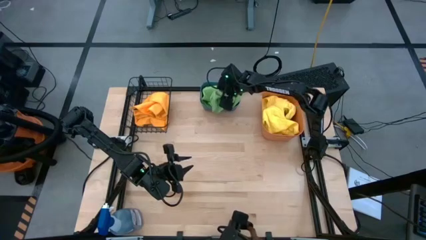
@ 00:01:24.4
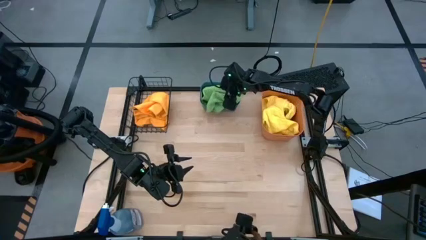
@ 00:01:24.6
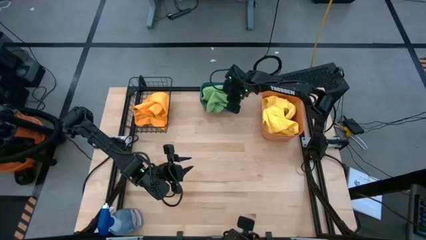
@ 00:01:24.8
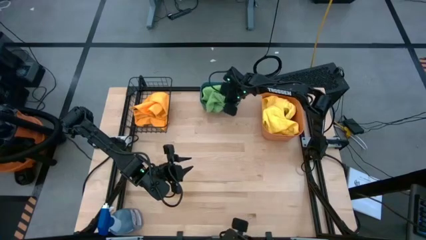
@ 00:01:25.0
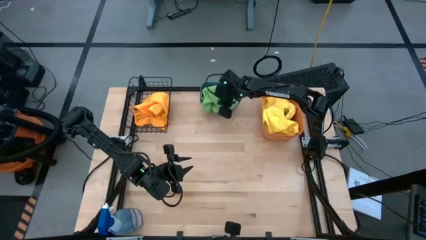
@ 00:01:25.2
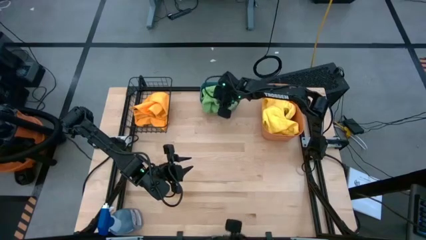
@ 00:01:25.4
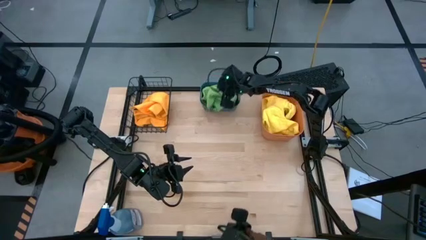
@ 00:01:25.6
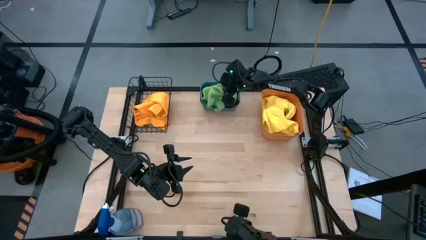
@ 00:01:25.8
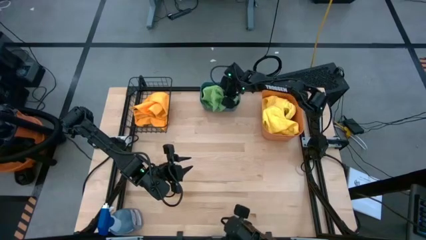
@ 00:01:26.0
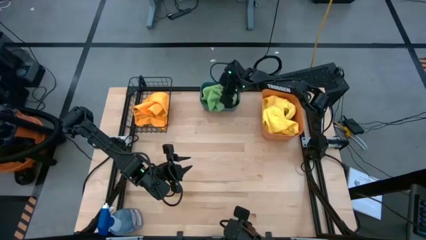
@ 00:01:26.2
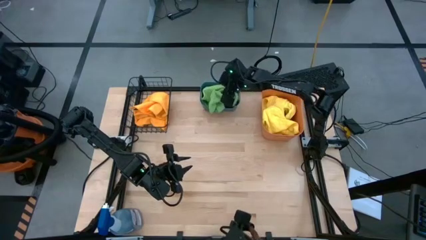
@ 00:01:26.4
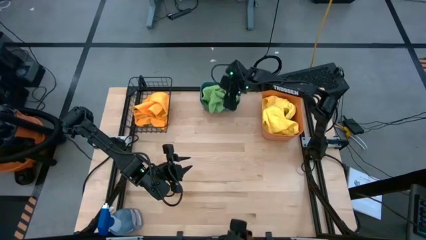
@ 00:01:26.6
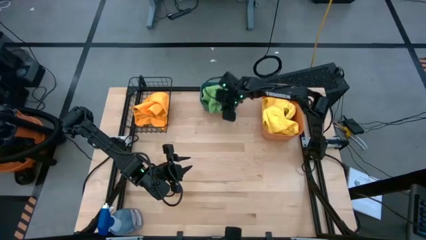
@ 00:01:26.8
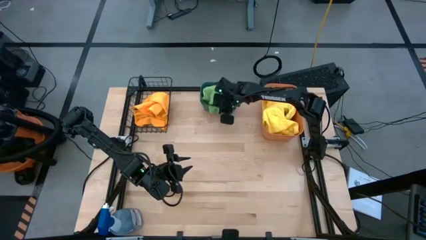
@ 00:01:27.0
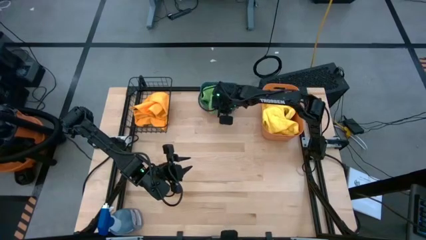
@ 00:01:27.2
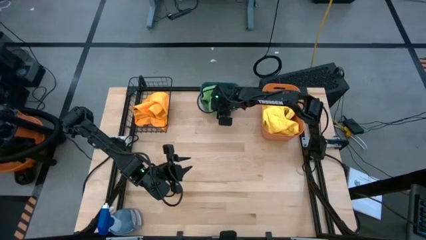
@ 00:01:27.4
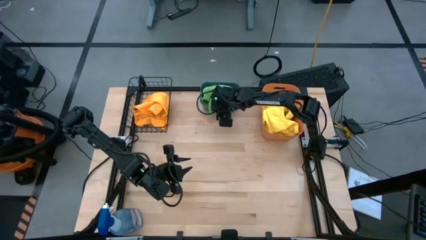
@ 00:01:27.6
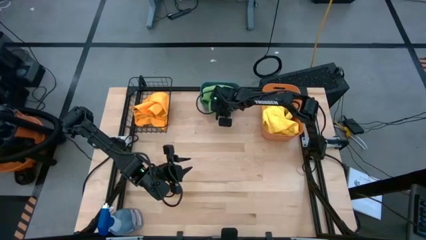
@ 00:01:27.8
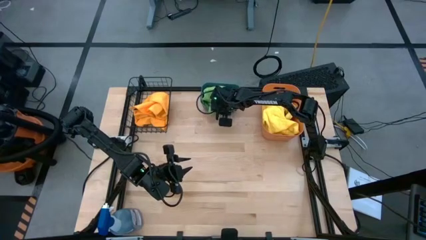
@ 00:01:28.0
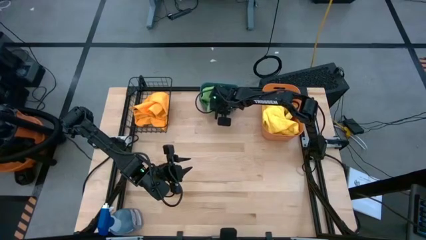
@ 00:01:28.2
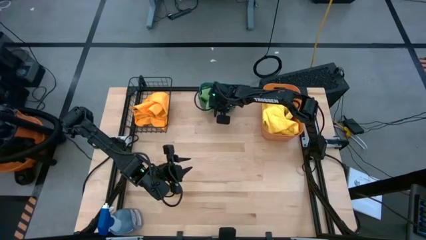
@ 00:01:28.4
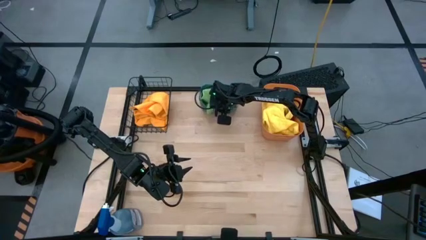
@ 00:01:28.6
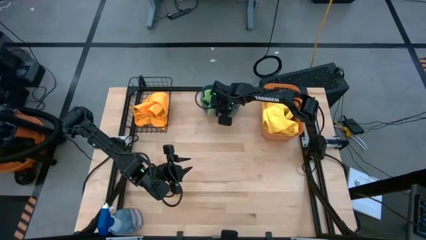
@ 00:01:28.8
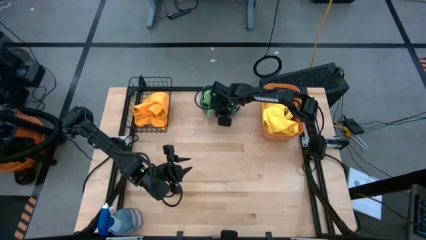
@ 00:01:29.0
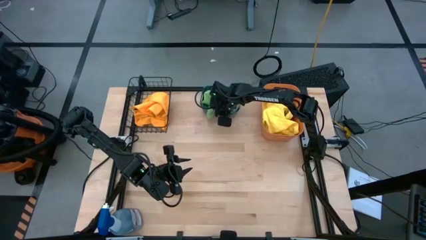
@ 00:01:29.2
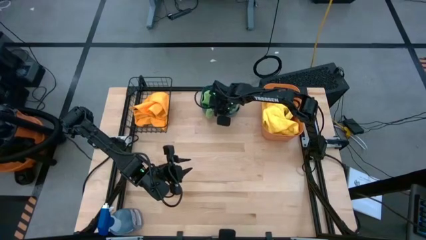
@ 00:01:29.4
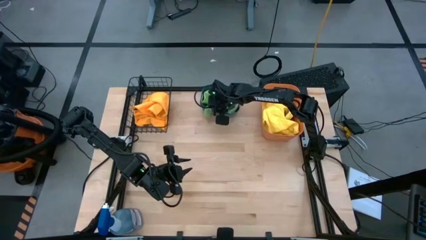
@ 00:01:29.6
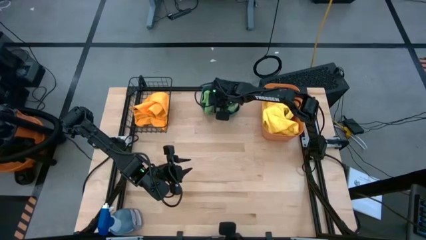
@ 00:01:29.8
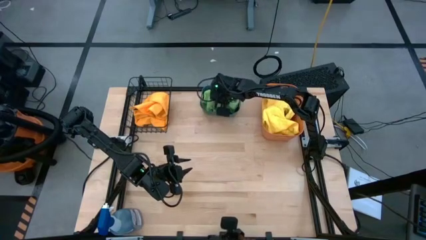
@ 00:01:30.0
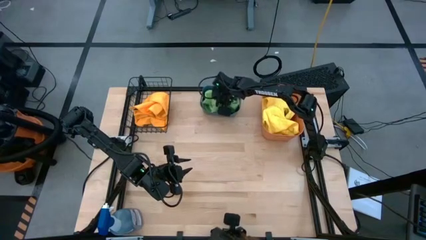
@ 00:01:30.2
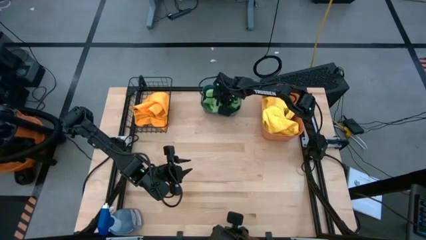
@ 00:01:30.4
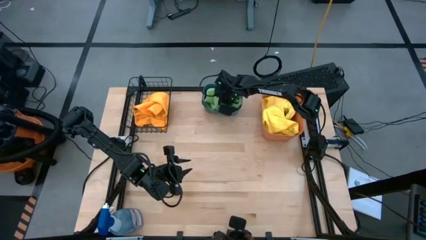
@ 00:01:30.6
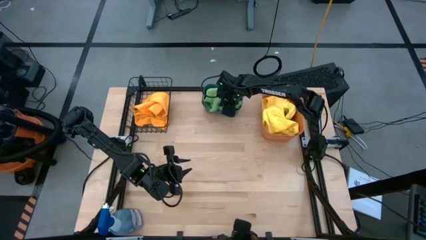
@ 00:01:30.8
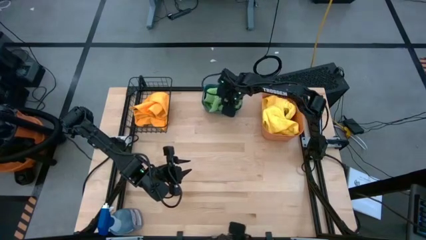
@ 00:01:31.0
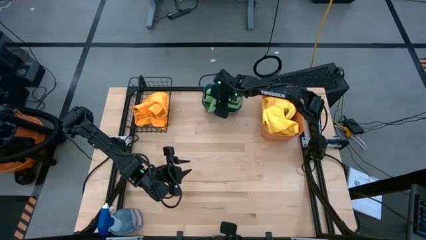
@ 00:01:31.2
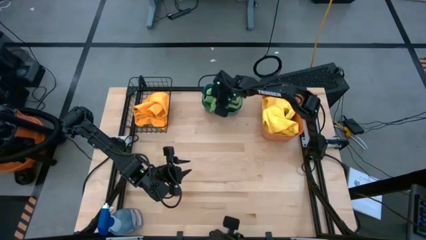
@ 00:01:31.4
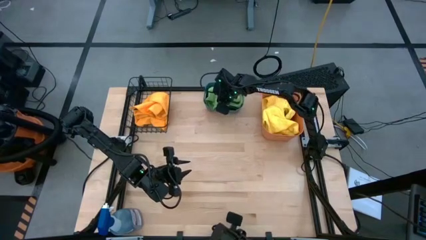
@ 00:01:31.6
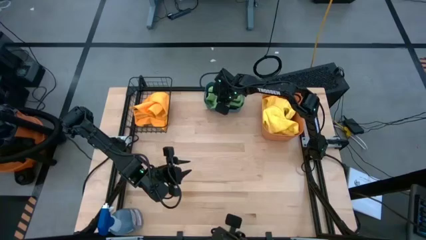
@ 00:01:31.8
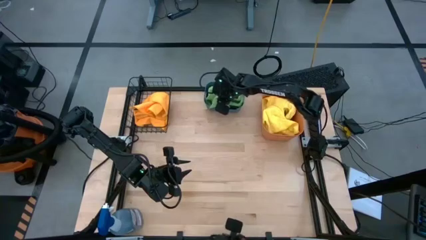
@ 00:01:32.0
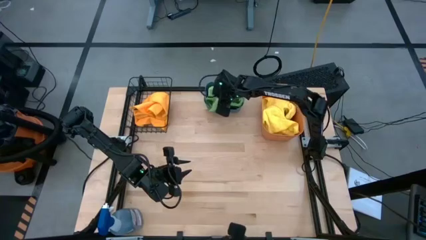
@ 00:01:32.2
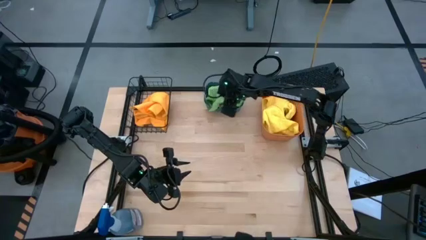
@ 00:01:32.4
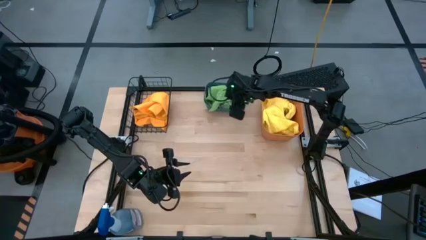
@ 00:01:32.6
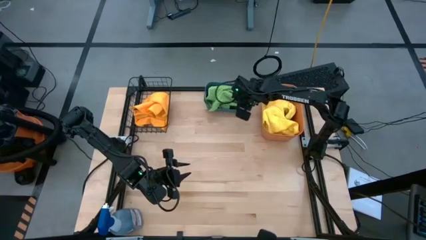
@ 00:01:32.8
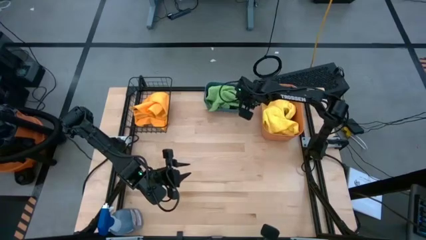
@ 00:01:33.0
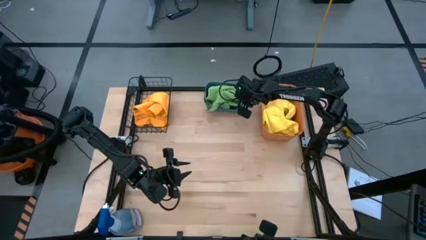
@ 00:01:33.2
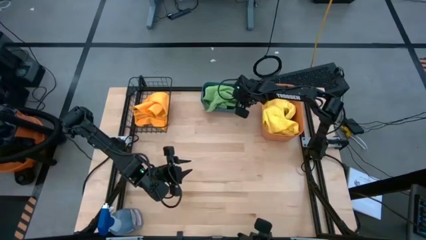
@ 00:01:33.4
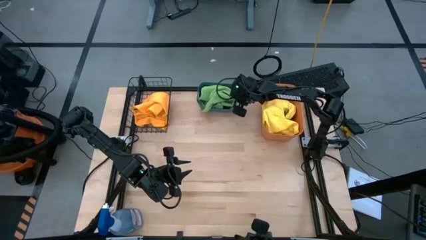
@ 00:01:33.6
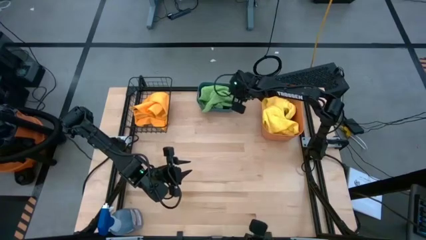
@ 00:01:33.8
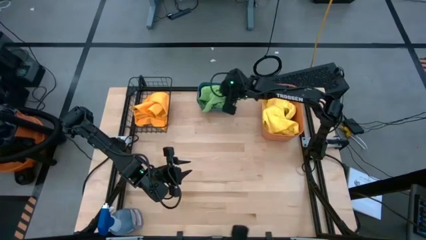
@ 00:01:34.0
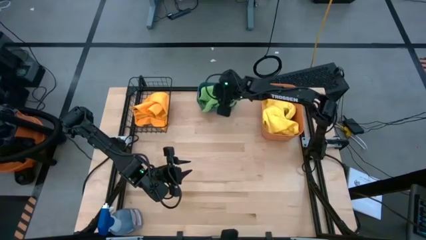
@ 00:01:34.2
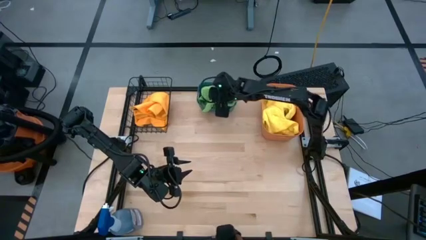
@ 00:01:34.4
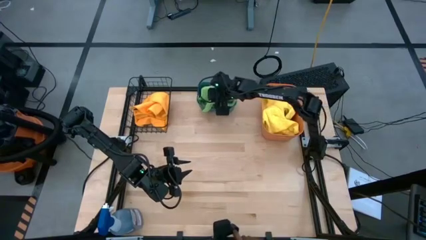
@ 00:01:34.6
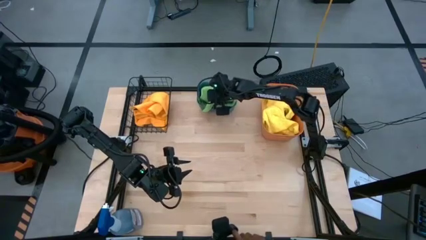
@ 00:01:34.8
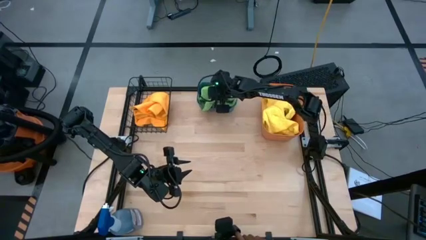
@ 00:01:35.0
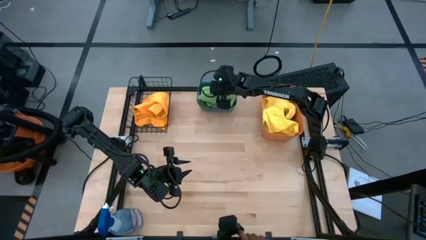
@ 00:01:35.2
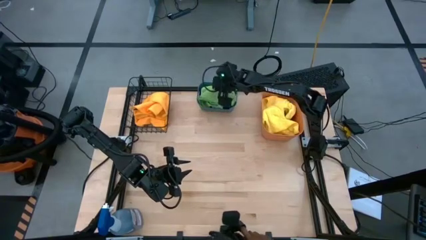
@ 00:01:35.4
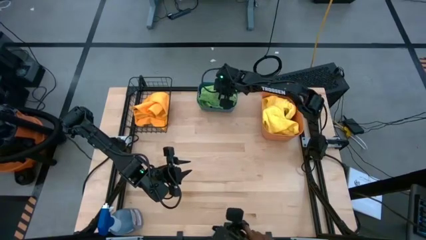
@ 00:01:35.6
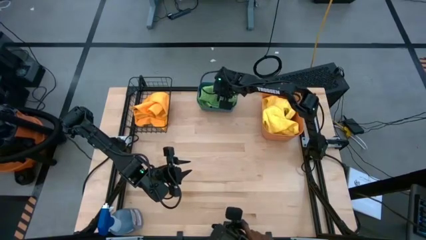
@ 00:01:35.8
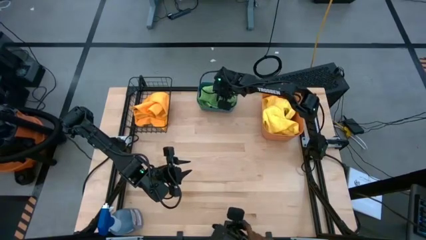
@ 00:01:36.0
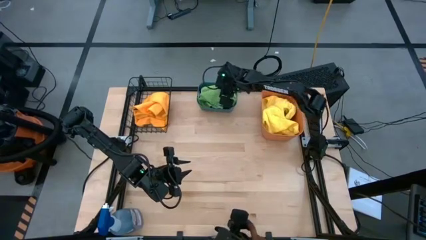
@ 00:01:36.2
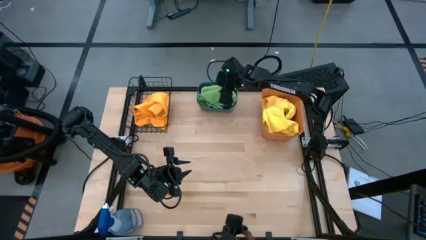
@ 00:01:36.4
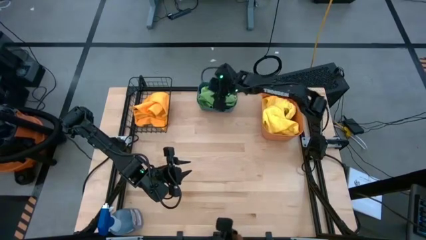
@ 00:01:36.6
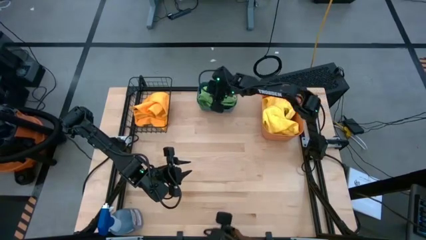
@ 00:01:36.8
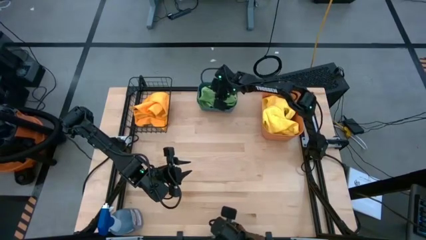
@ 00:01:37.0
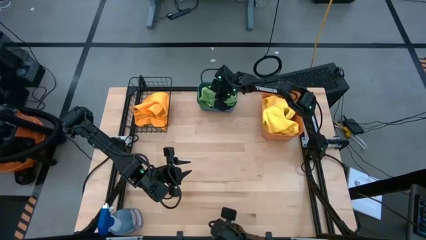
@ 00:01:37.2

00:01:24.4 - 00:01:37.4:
Task: Sort microfiber towel by color & place in baskets
Put the green microfiber cloth into the blue bin
